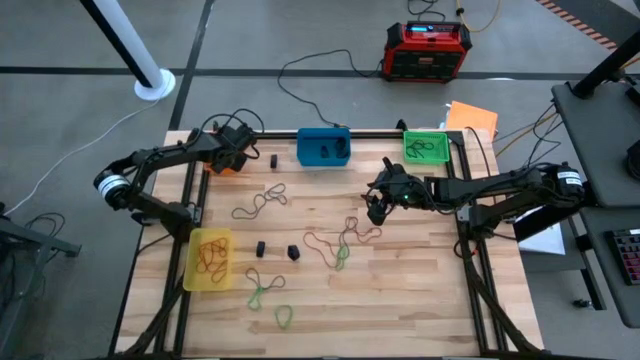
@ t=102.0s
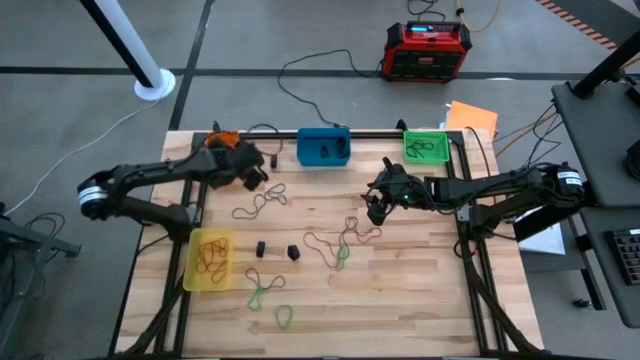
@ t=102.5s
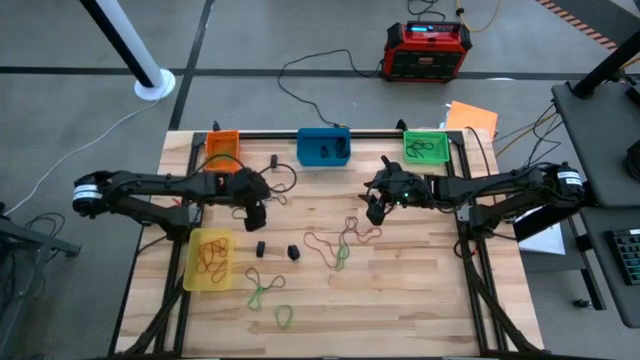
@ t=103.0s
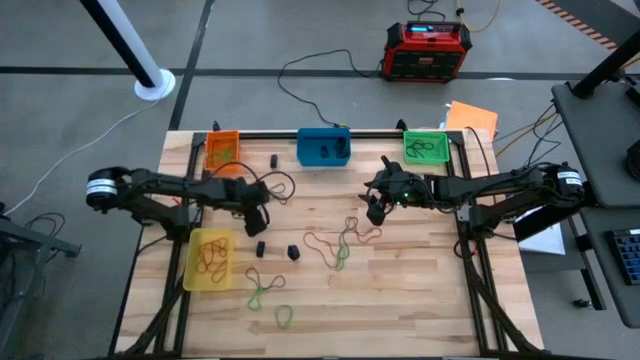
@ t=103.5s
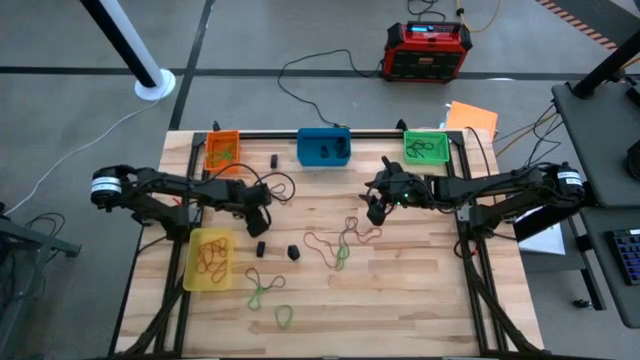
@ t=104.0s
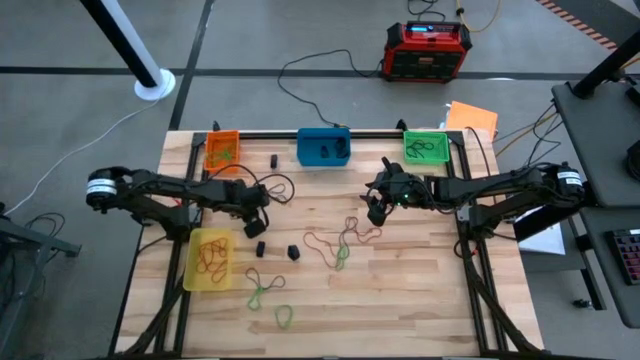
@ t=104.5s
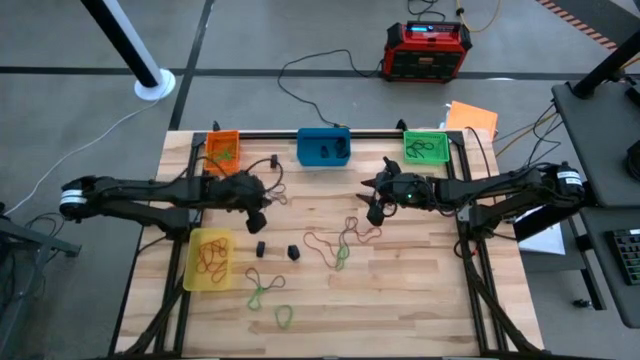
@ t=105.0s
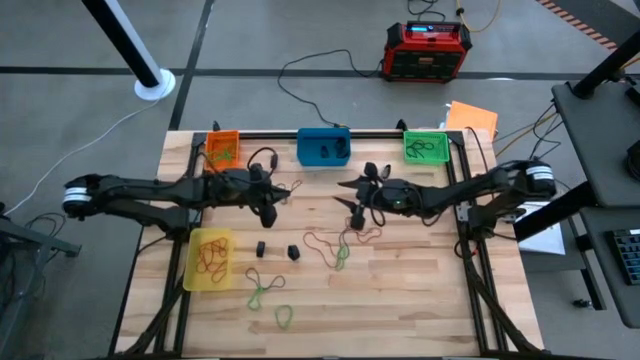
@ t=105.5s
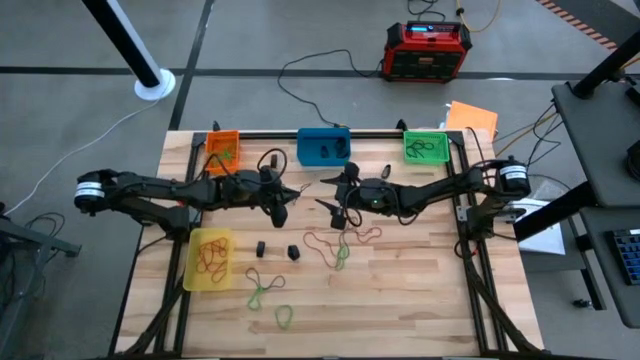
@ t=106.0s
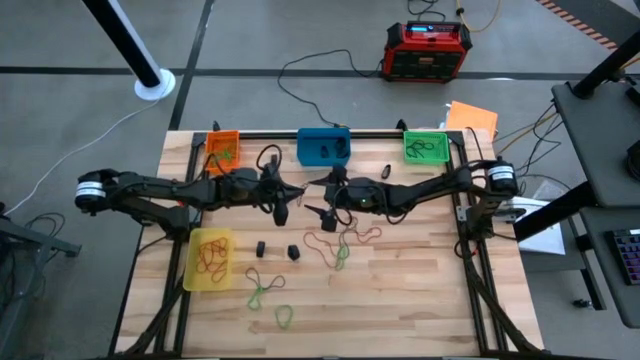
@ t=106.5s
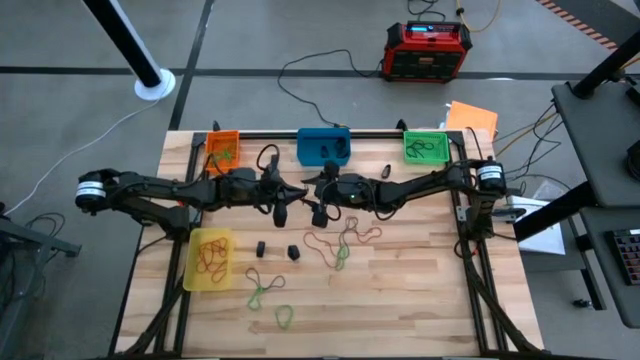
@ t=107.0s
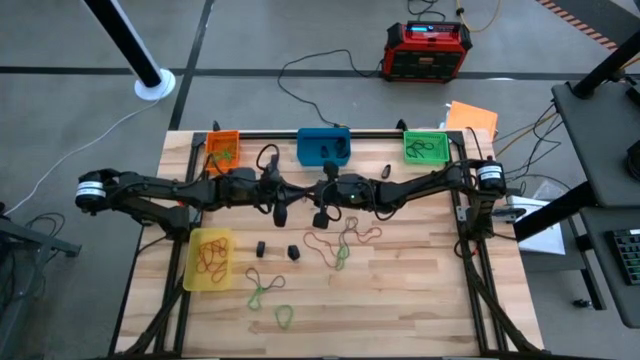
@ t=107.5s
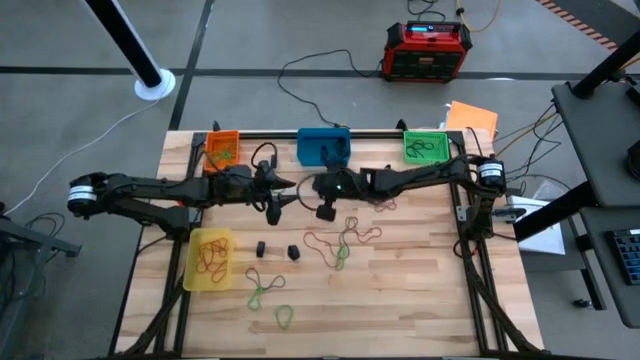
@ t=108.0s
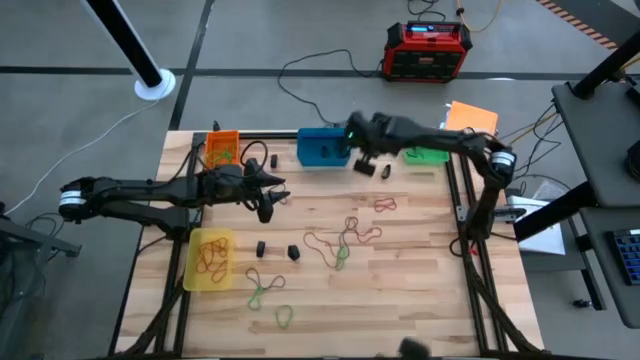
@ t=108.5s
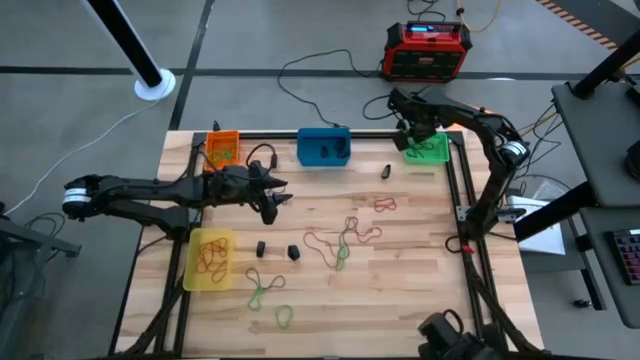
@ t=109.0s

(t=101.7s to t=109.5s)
Task: Sort rubber bands into baskets
Put the violet rubber band into the green bin

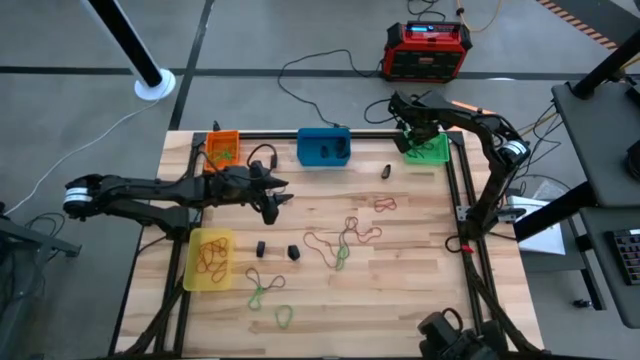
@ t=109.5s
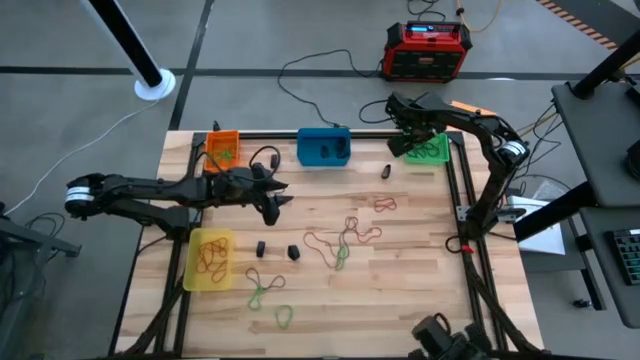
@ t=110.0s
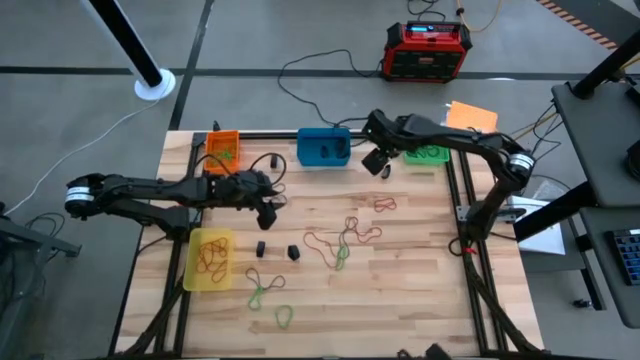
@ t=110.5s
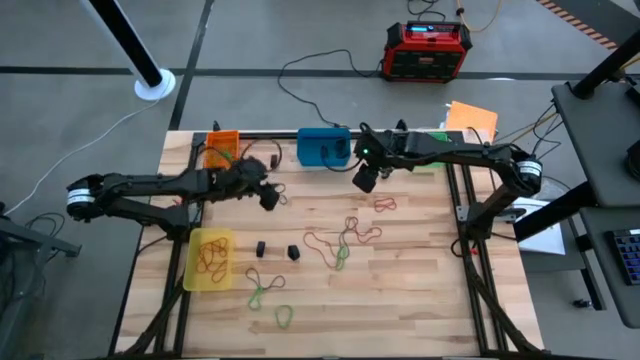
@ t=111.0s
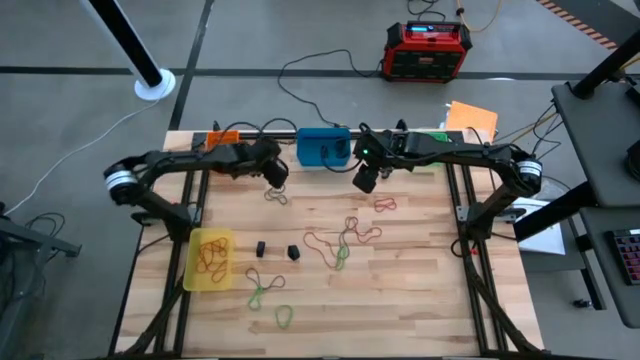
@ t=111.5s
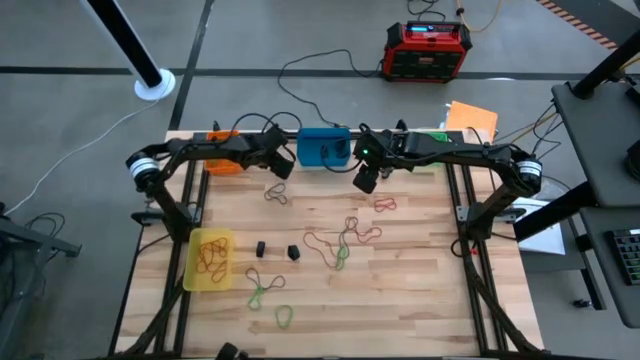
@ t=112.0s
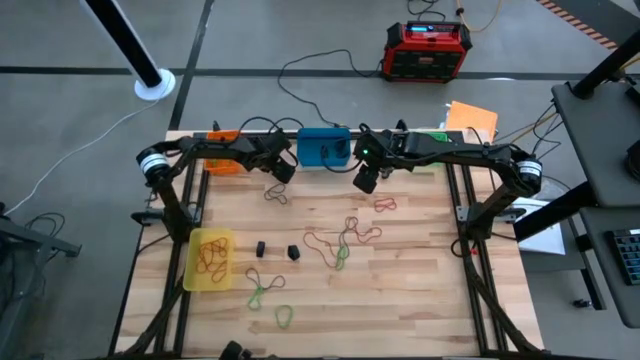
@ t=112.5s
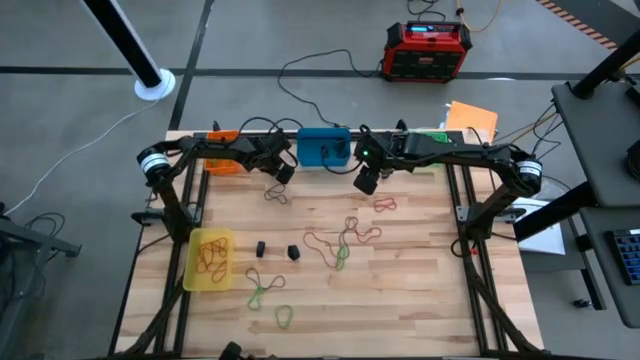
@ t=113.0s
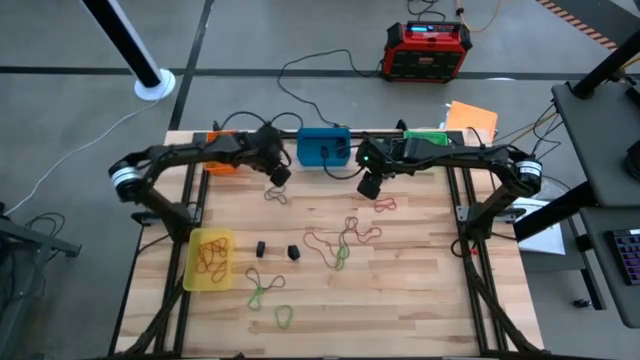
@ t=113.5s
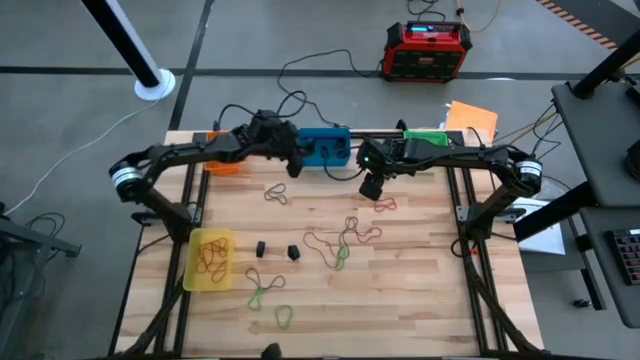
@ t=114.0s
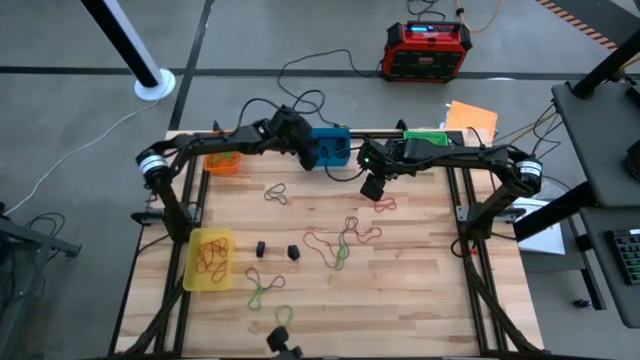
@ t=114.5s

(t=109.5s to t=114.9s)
Put the top left black rubber band into the blue bin

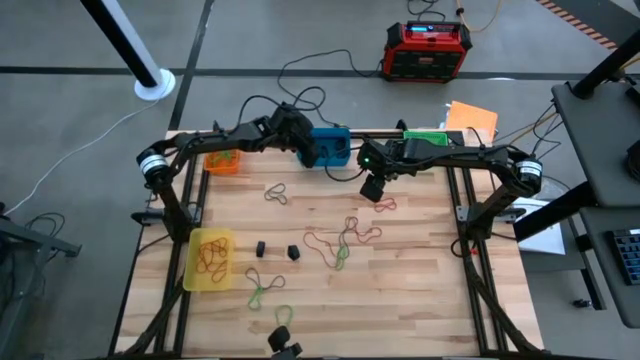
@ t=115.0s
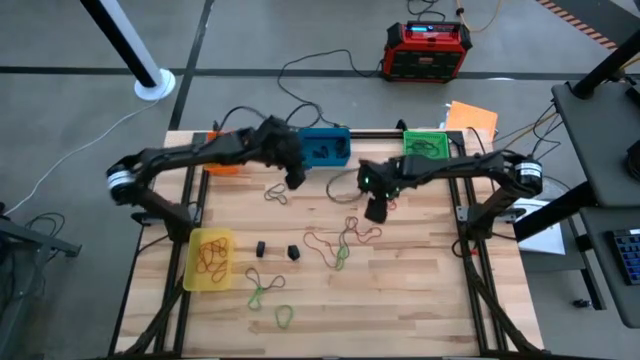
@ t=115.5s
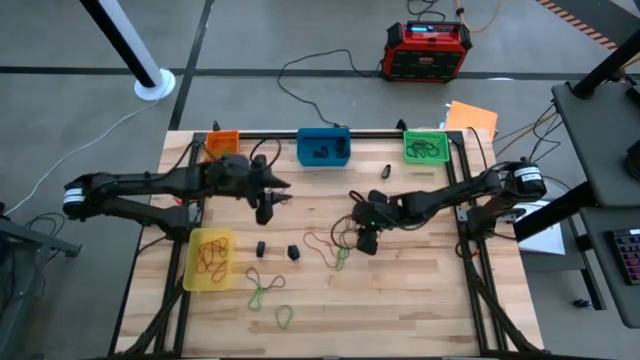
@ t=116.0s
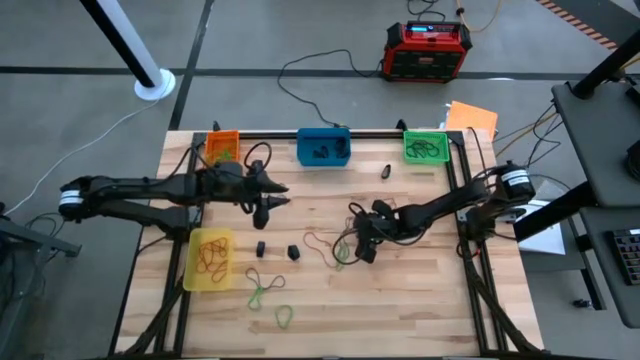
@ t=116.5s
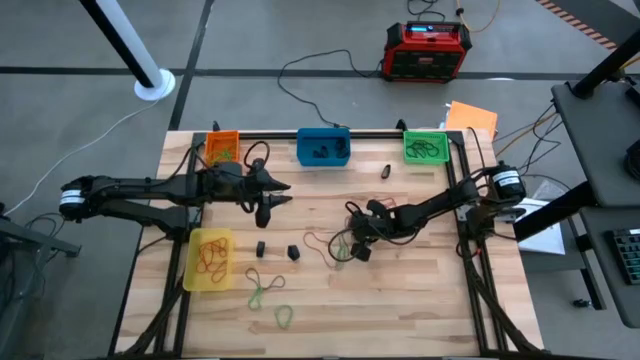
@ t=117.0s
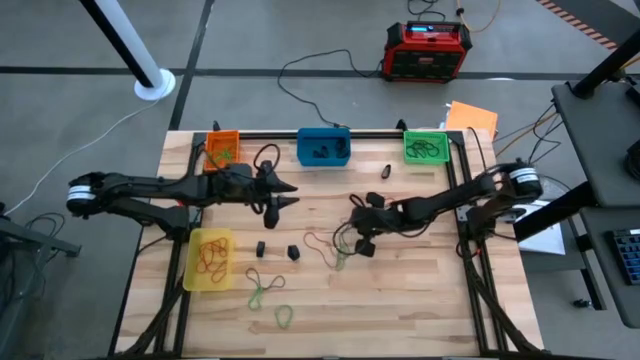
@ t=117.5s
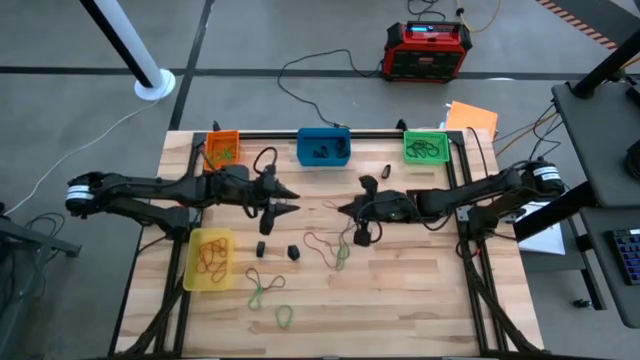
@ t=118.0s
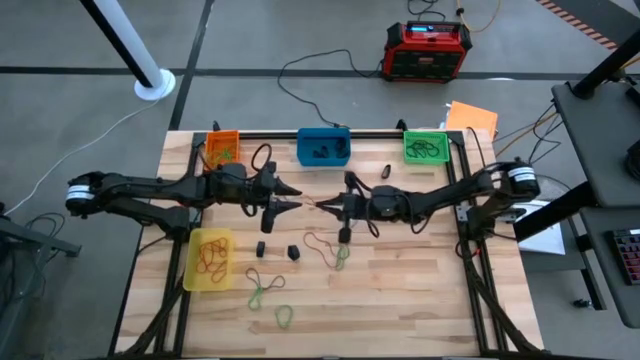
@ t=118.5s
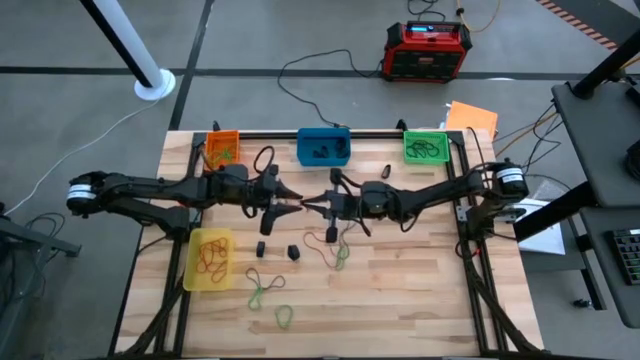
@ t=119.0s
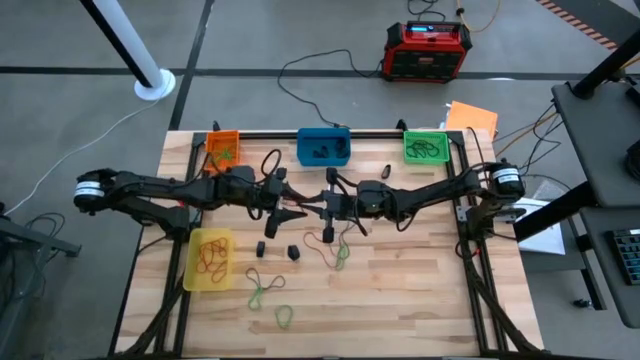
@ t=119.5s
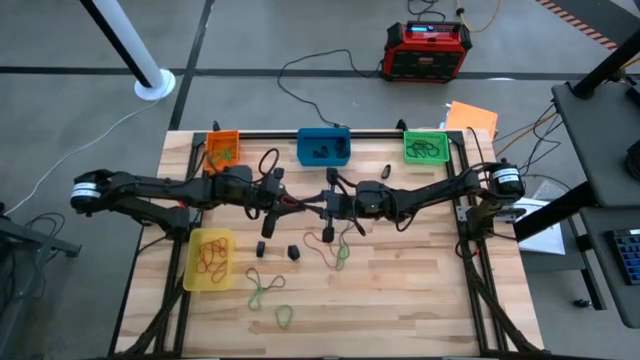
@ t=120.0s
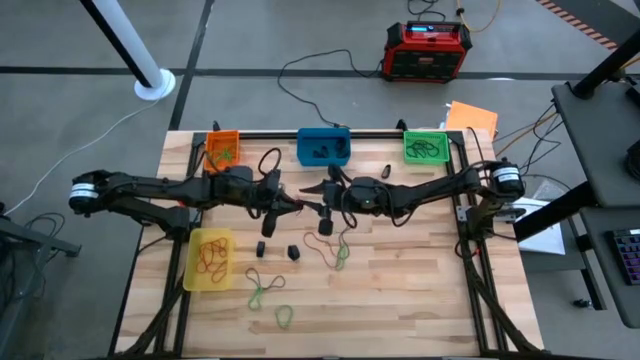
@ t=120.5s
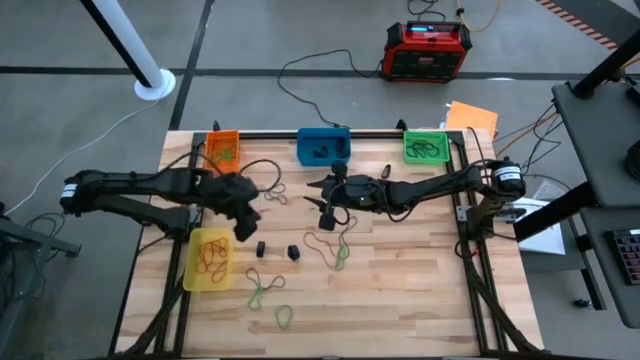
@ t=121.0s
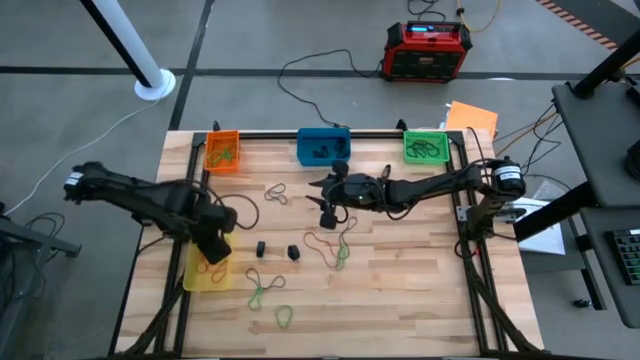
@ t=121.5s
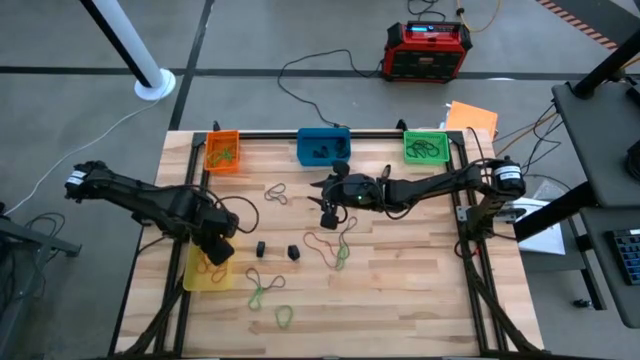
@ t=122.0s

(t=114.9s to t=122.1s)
Put the center red rubber band into the yellow bin
